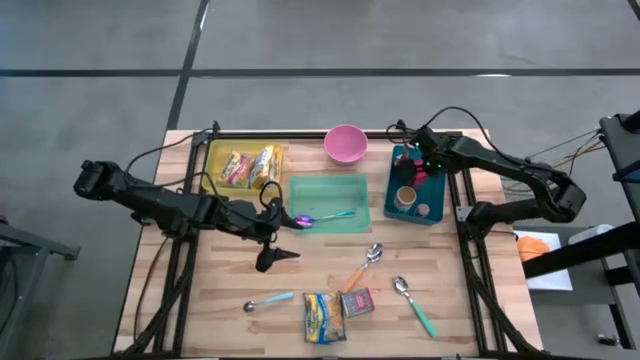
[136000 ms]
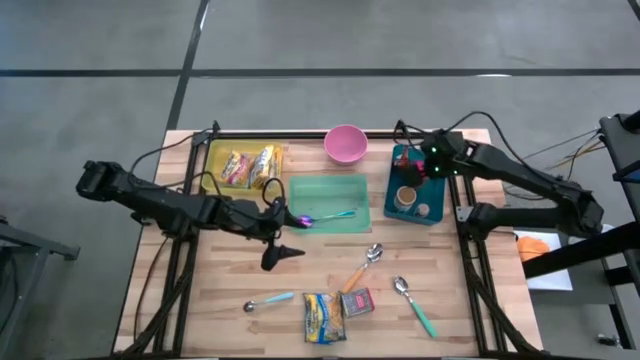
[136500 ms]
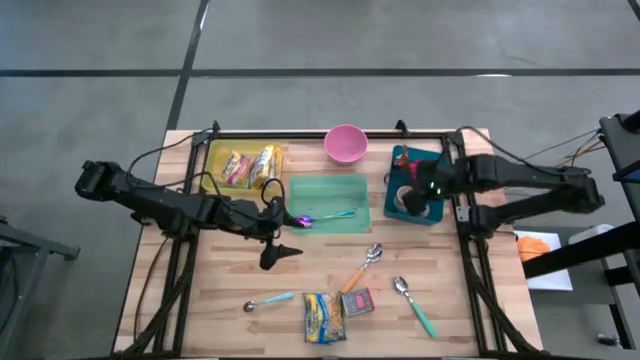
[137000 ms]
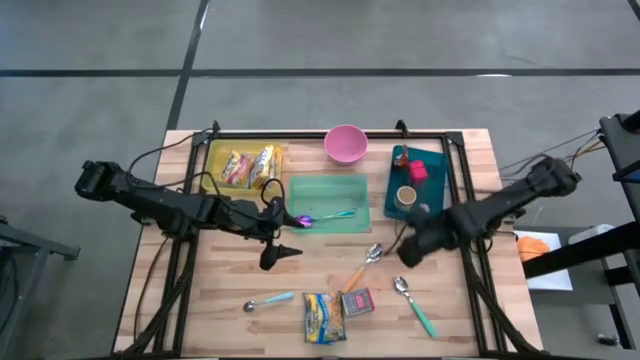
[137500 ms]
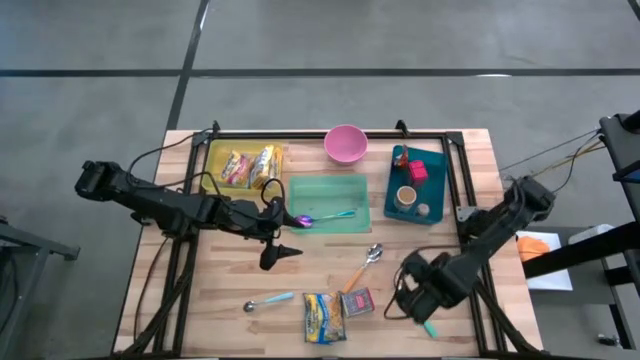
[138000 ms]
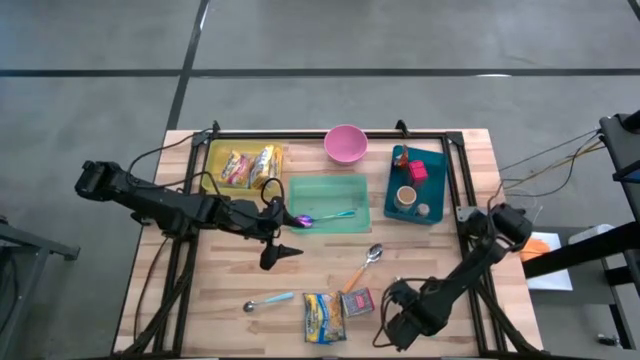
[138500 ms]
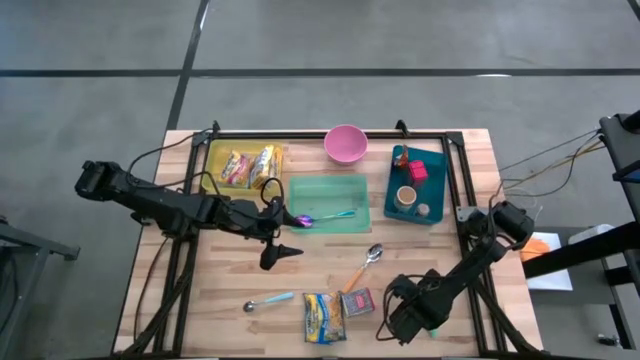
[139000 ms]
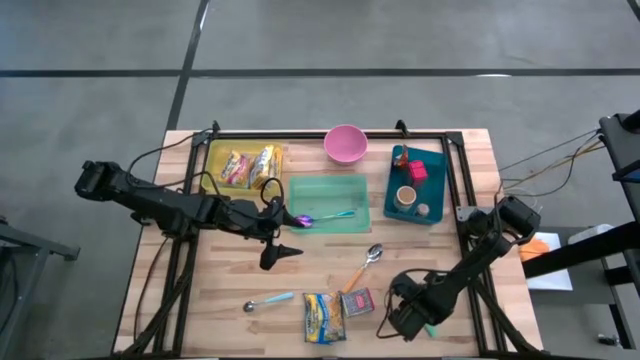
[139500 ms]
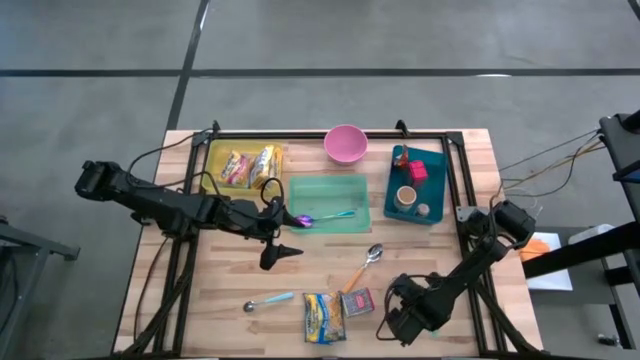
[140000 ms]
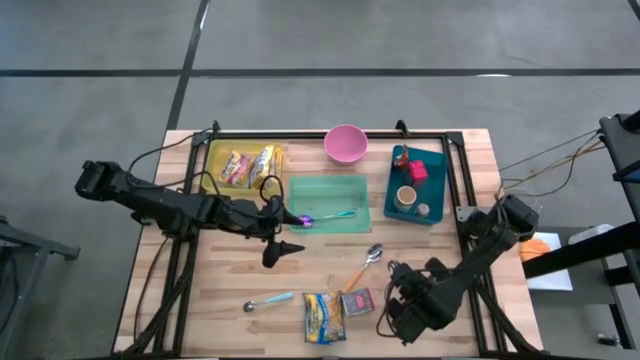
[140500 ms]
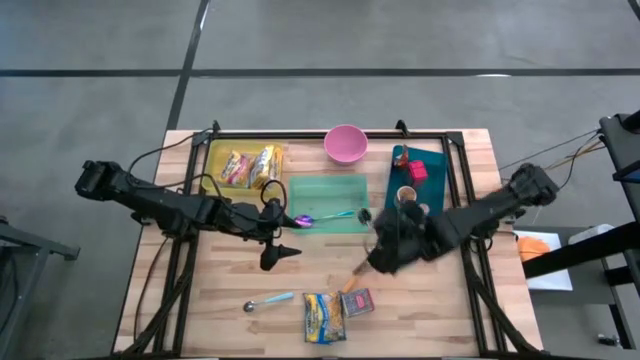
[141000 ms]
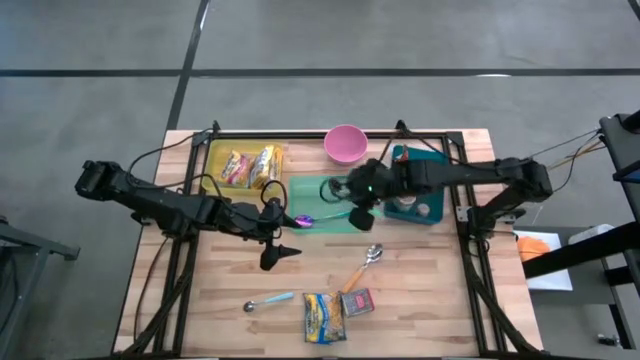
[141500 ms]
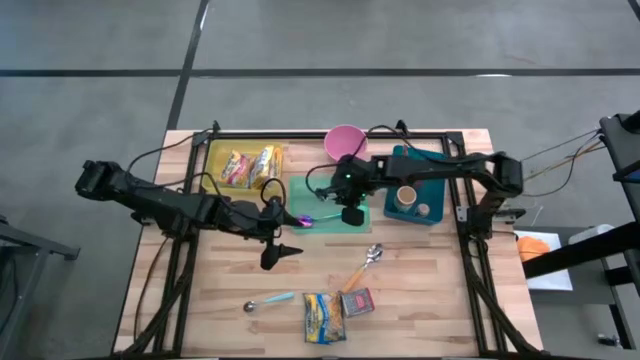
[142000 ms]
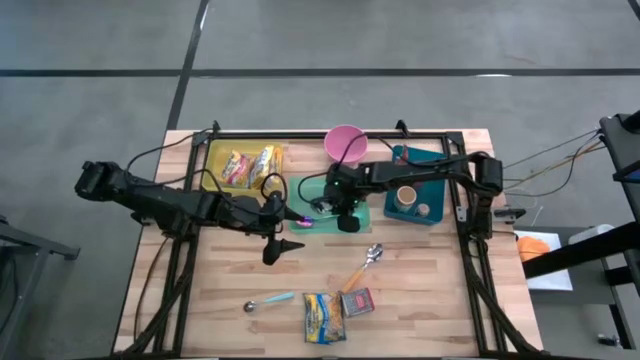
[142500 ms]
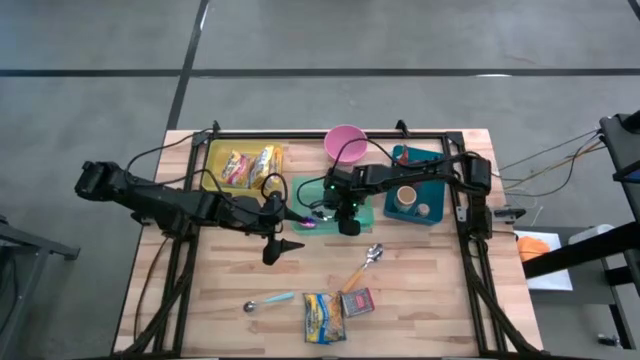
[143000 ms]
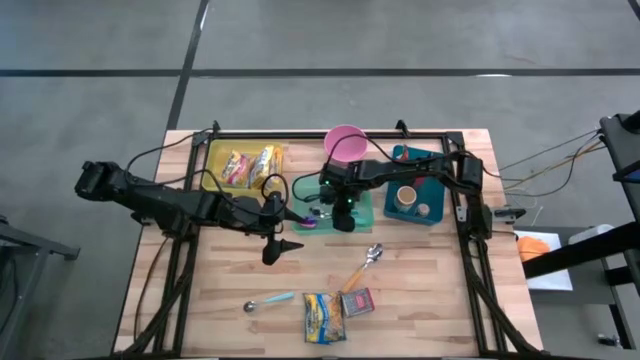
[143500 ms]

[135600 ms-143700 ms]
Put the light green spoon into the green bin

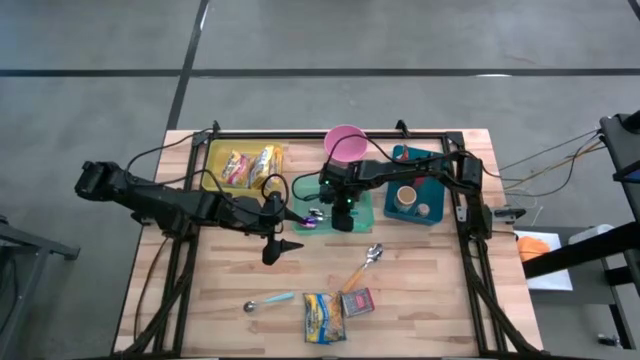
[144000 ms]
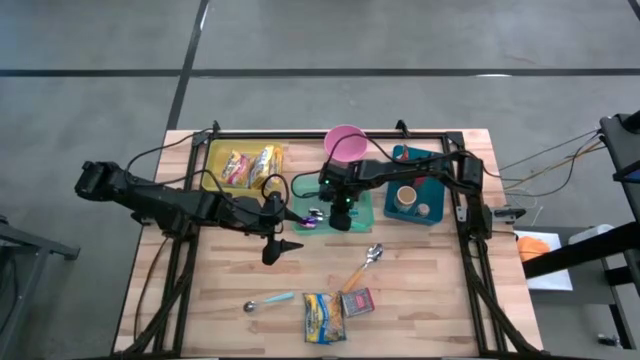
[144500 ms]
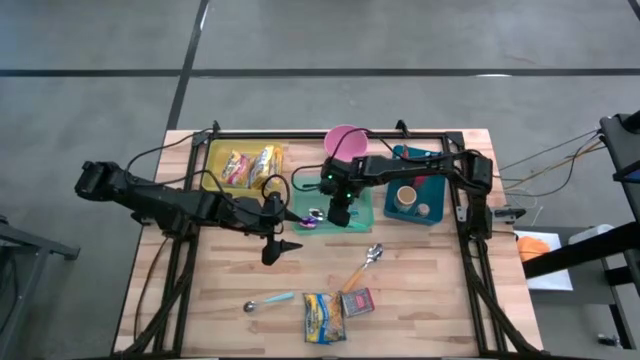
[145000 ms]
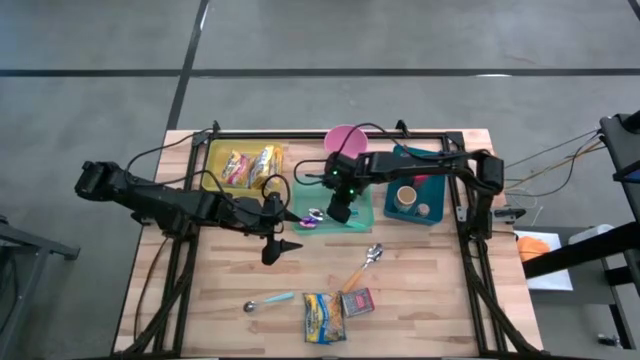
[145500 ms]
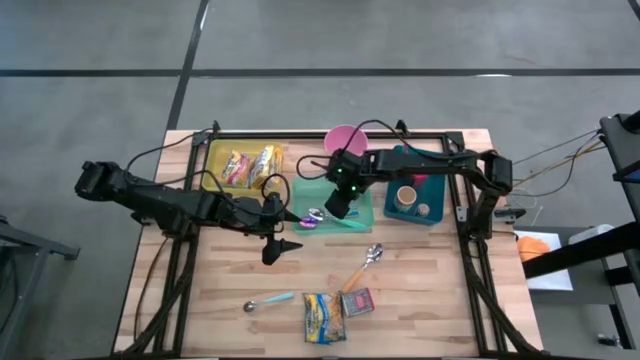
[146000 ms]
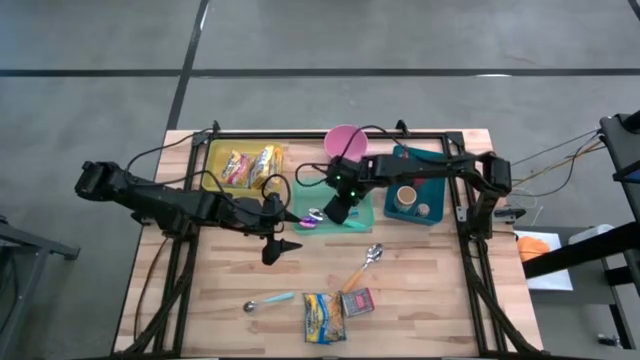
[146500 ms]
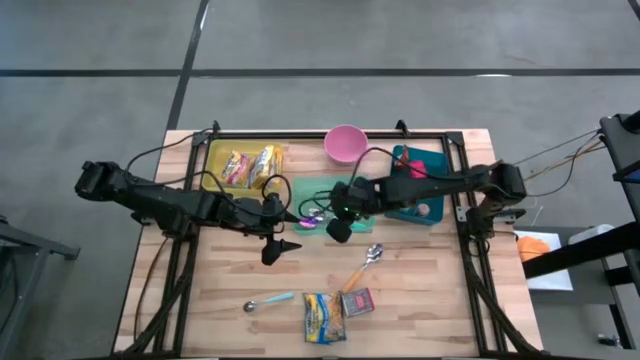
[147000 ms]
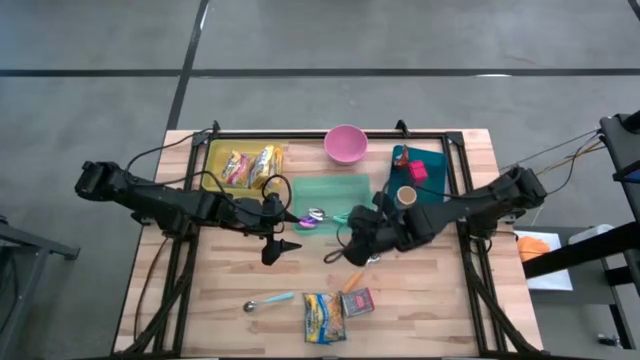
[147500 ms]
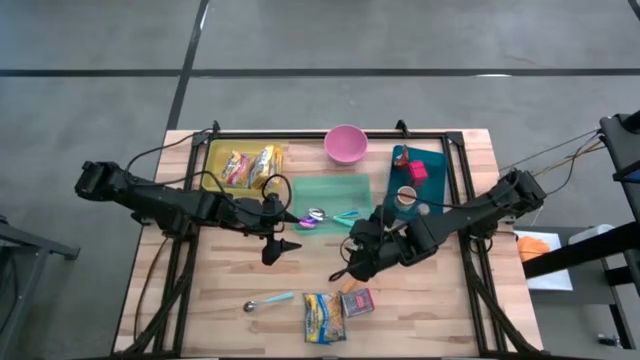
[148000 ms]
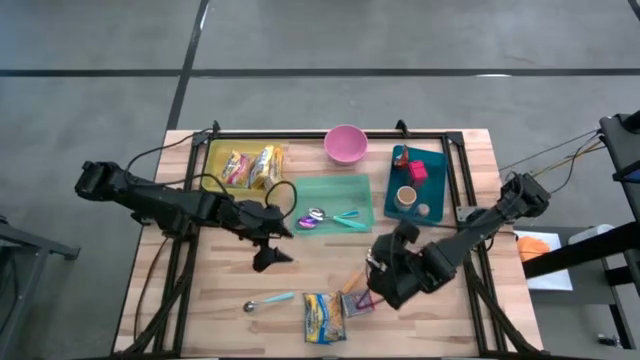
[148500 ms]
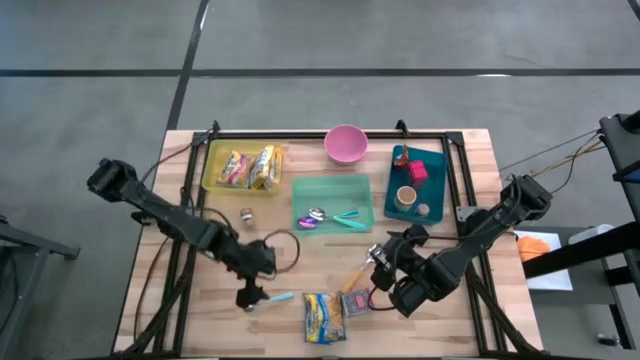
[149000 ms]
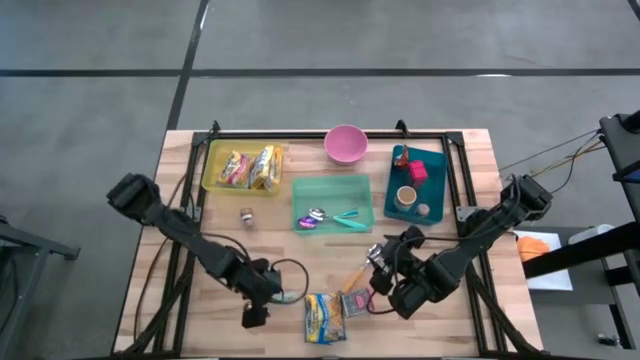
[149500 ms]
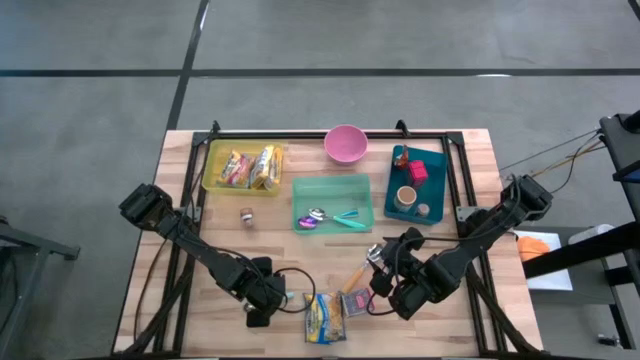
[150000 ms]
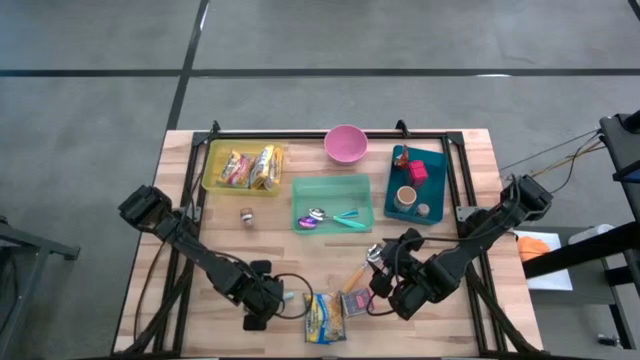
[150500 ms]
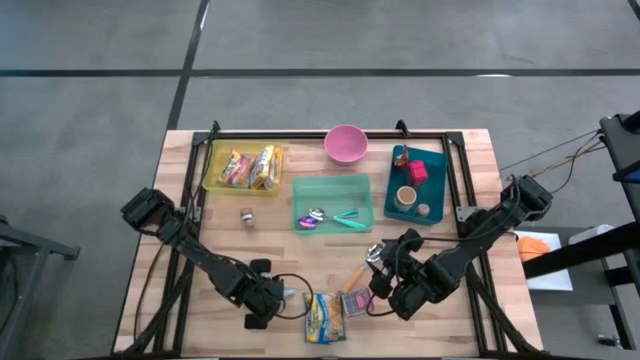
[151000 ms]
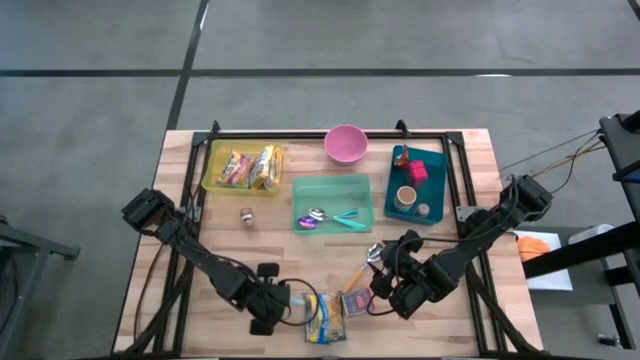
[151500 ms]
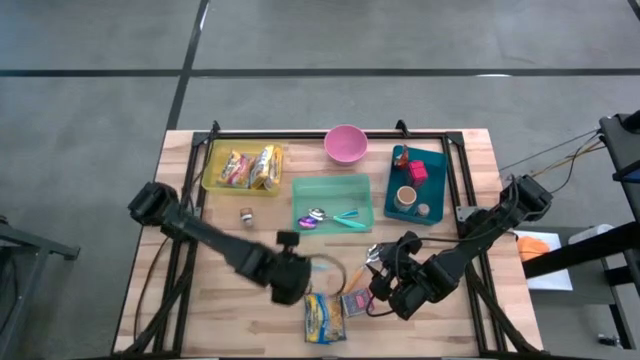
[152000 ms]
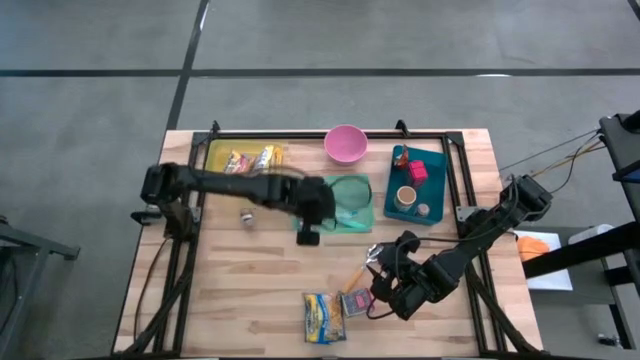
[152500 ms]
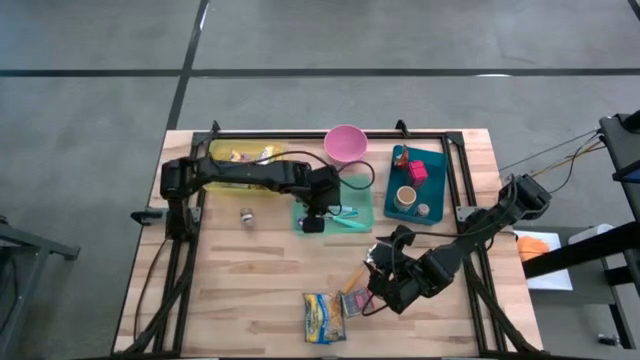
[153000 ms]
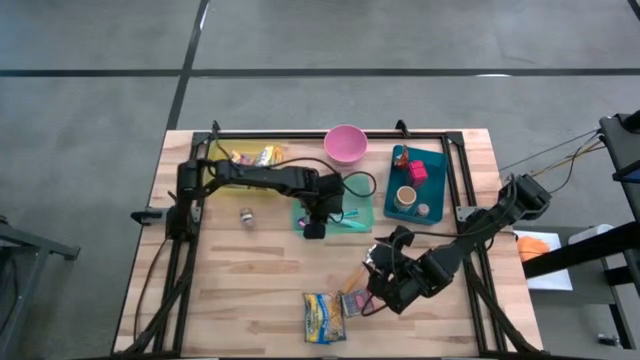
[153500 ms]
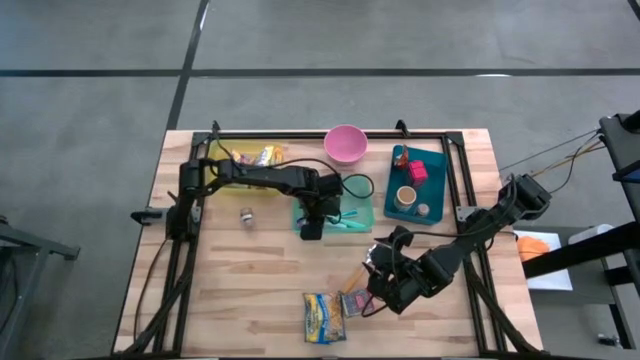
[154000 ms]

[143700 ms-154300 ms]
Put the light blue spoon into the green bin
